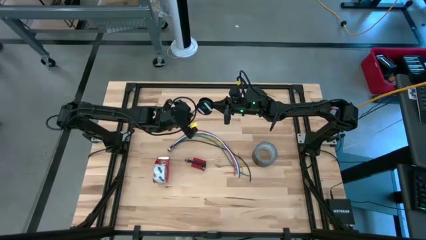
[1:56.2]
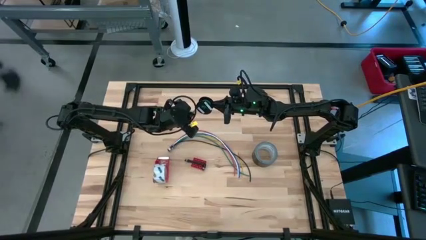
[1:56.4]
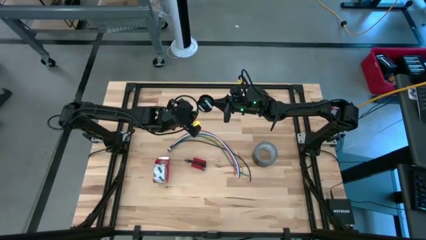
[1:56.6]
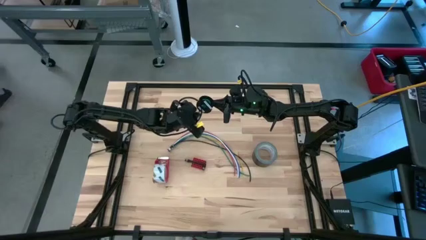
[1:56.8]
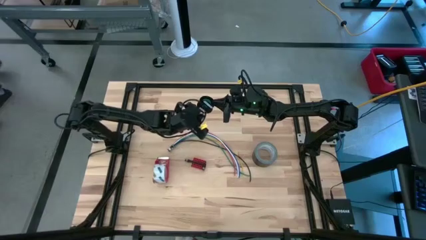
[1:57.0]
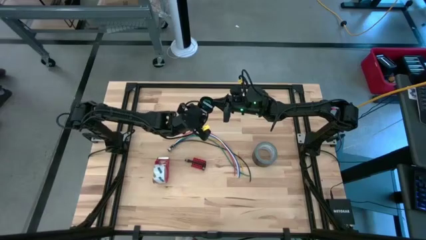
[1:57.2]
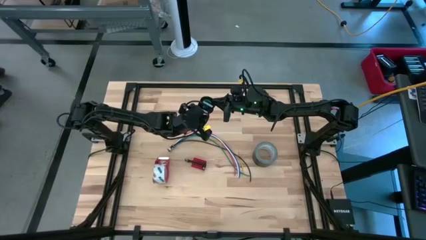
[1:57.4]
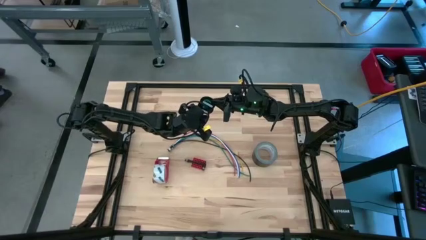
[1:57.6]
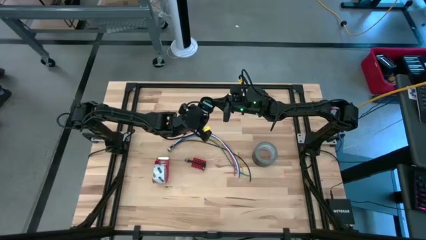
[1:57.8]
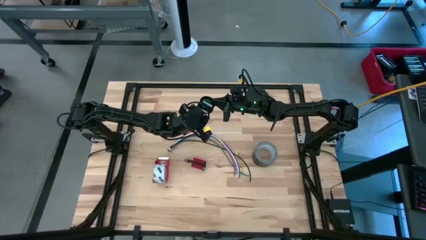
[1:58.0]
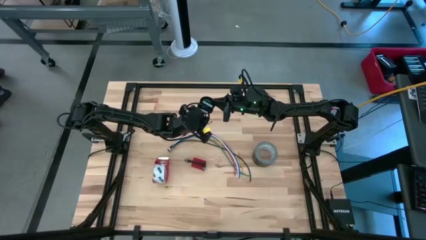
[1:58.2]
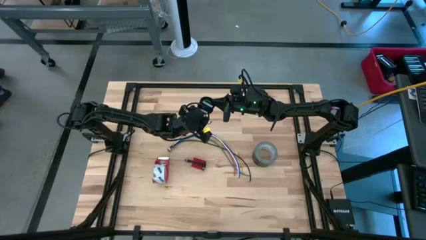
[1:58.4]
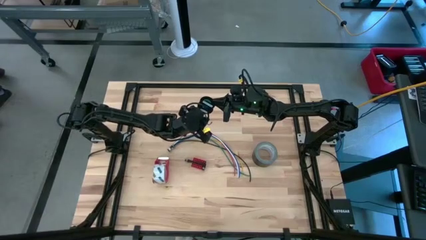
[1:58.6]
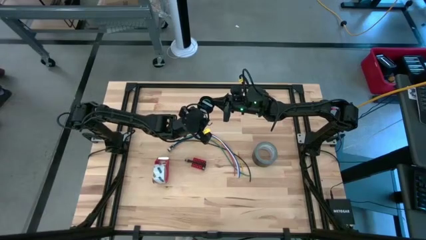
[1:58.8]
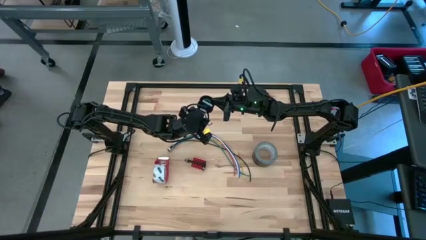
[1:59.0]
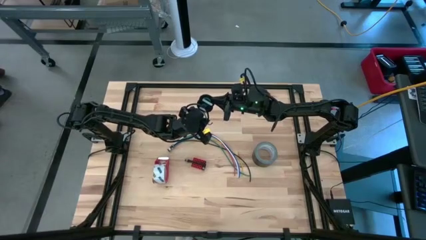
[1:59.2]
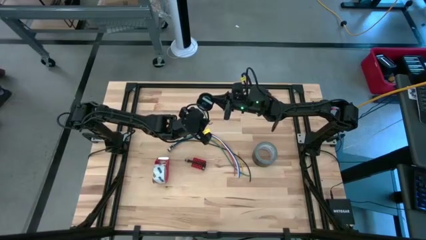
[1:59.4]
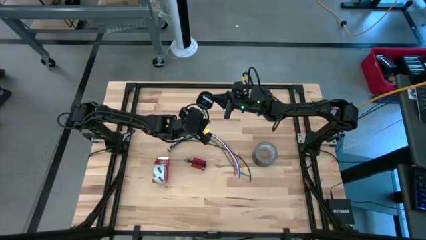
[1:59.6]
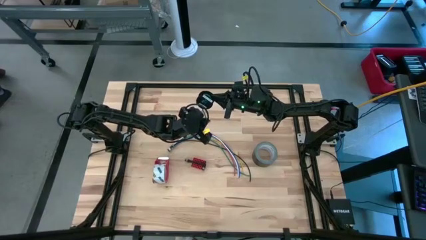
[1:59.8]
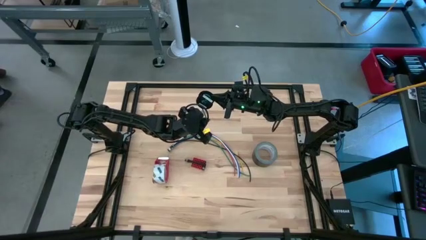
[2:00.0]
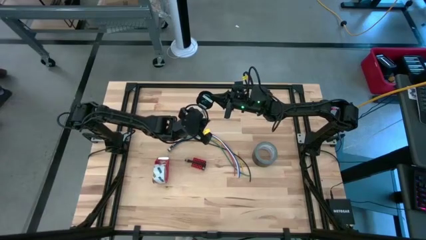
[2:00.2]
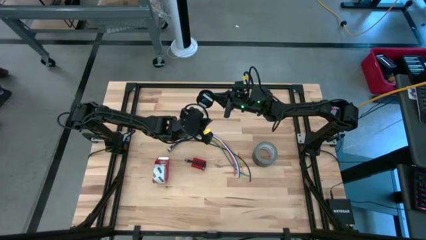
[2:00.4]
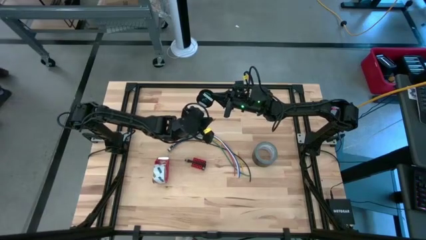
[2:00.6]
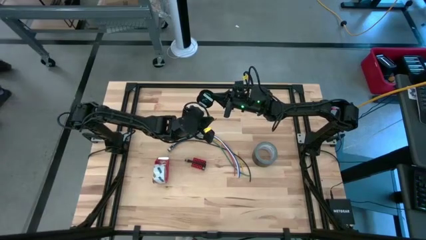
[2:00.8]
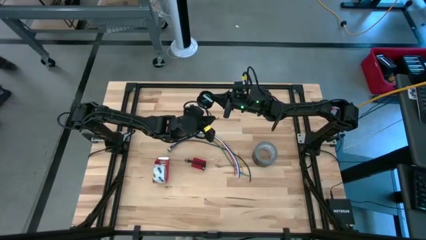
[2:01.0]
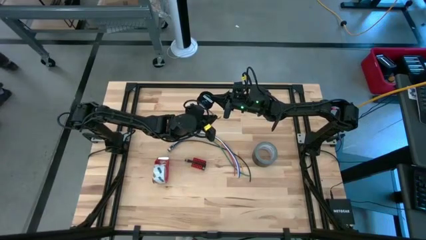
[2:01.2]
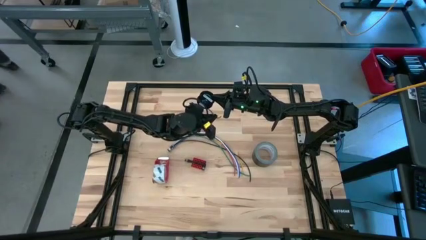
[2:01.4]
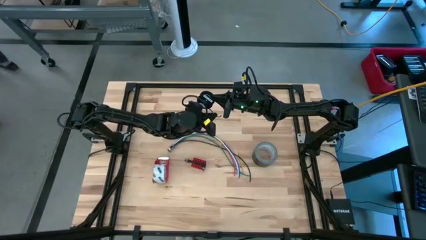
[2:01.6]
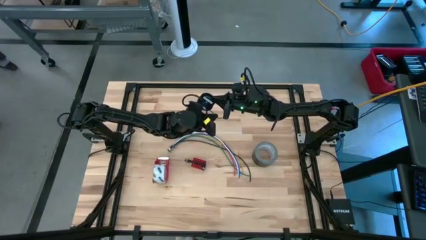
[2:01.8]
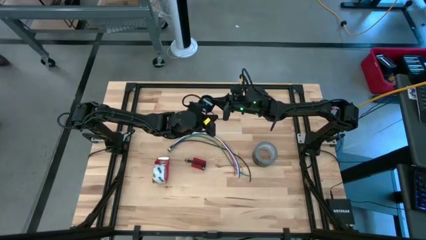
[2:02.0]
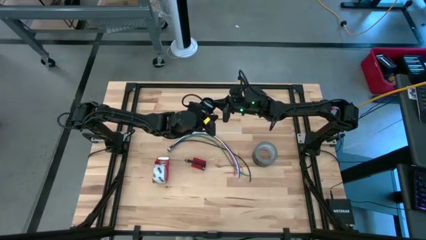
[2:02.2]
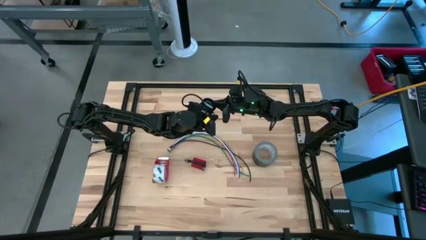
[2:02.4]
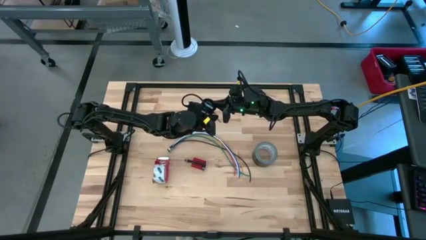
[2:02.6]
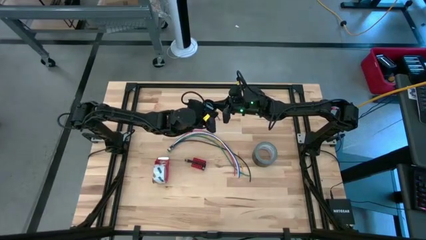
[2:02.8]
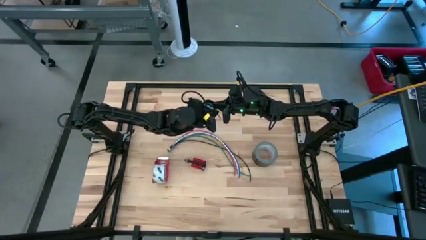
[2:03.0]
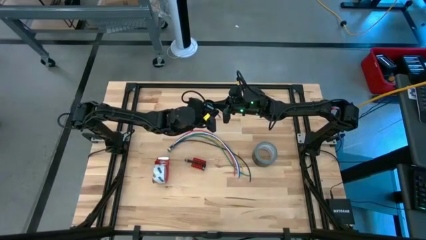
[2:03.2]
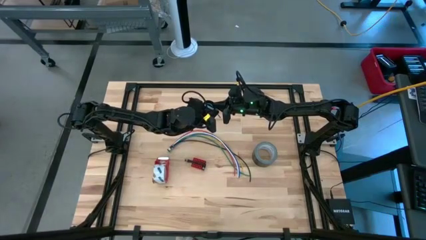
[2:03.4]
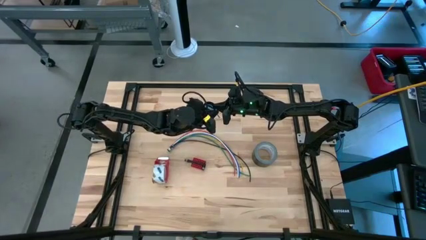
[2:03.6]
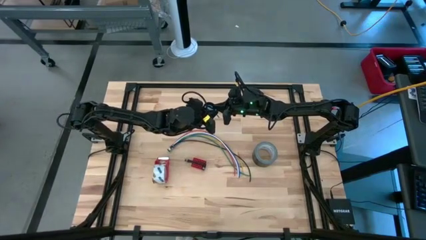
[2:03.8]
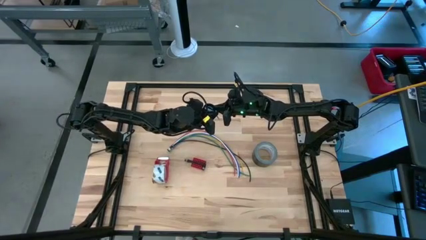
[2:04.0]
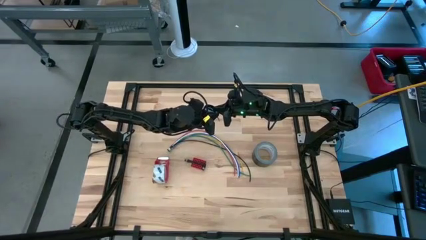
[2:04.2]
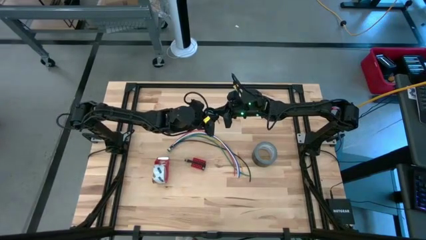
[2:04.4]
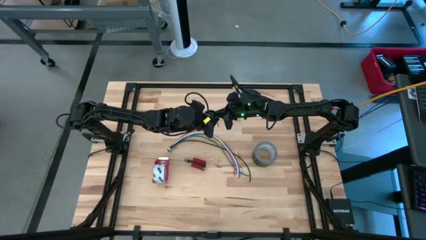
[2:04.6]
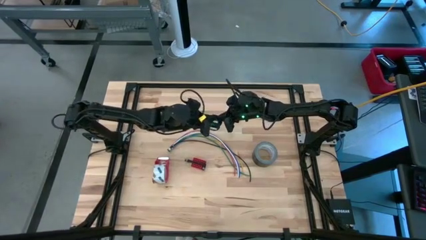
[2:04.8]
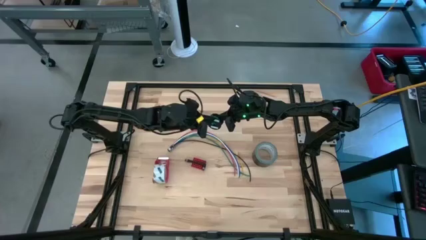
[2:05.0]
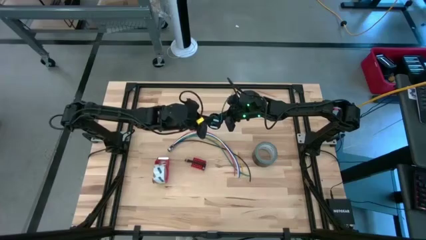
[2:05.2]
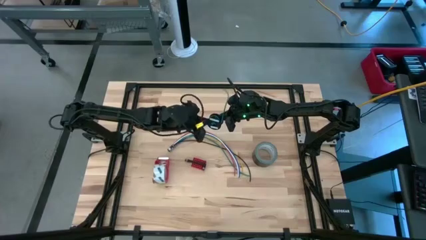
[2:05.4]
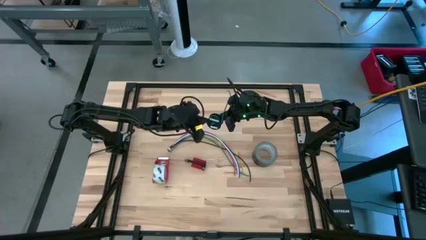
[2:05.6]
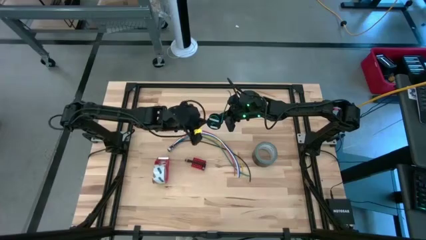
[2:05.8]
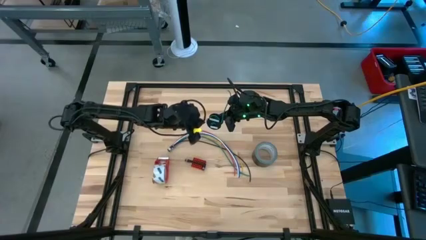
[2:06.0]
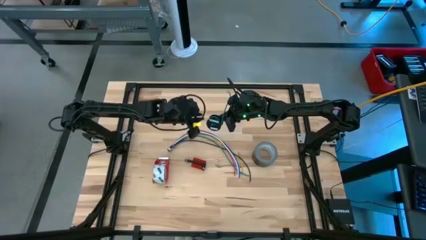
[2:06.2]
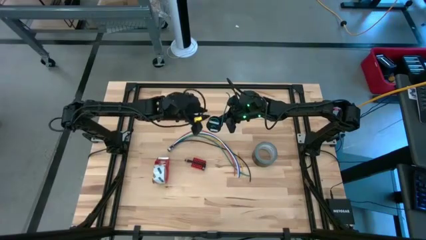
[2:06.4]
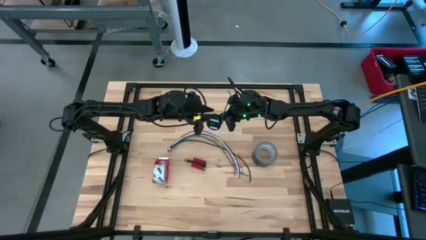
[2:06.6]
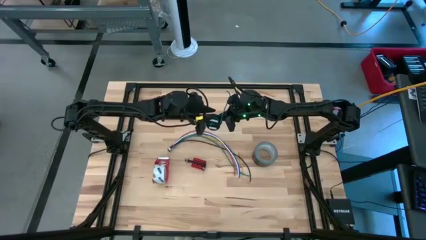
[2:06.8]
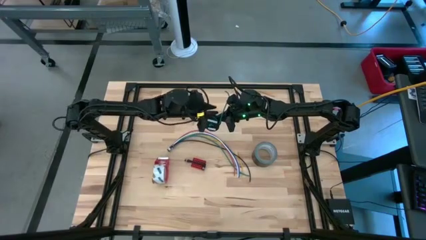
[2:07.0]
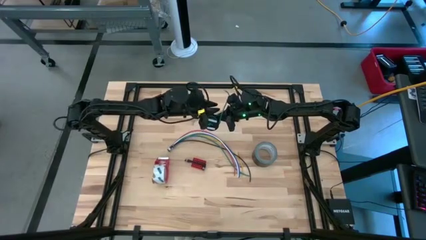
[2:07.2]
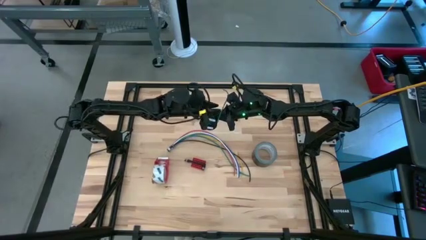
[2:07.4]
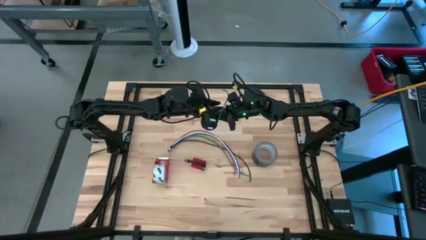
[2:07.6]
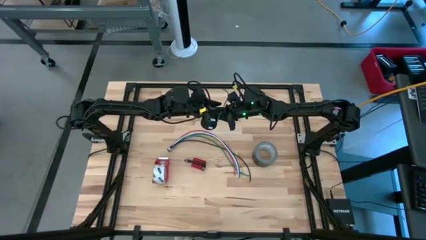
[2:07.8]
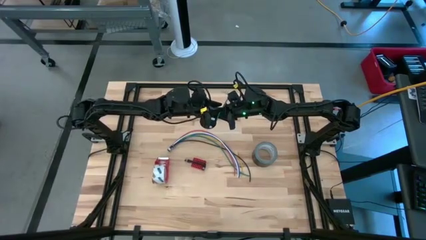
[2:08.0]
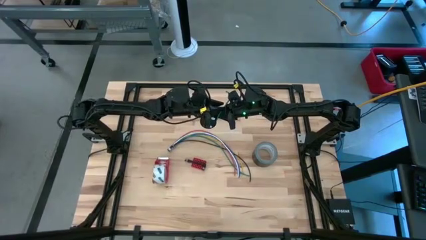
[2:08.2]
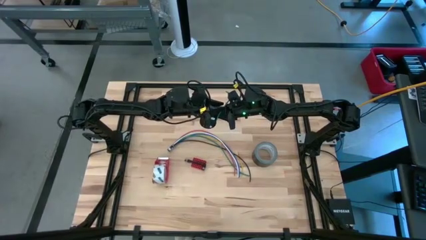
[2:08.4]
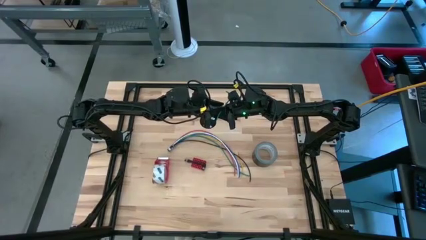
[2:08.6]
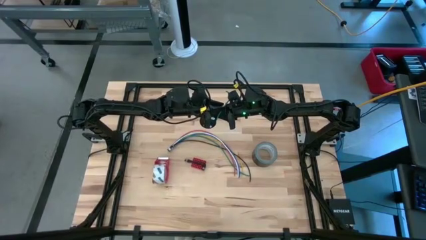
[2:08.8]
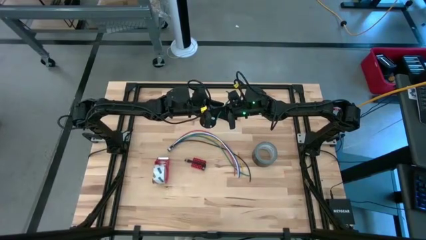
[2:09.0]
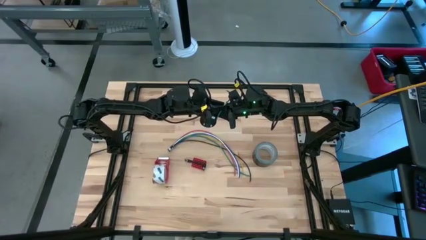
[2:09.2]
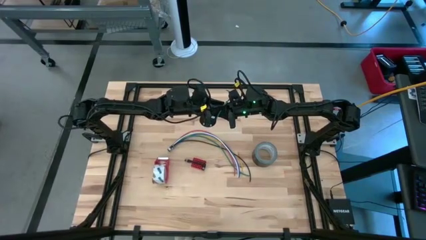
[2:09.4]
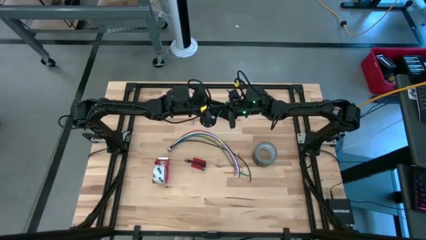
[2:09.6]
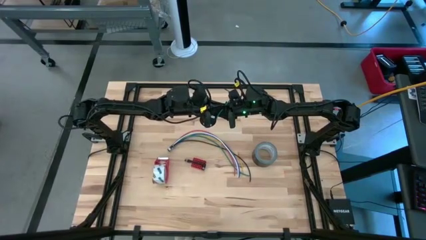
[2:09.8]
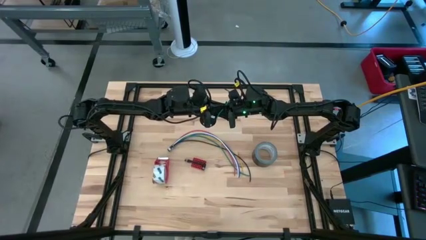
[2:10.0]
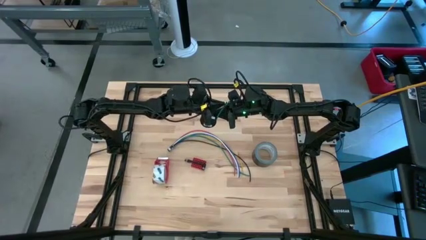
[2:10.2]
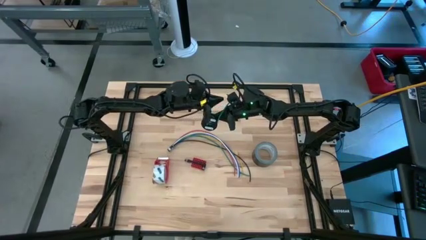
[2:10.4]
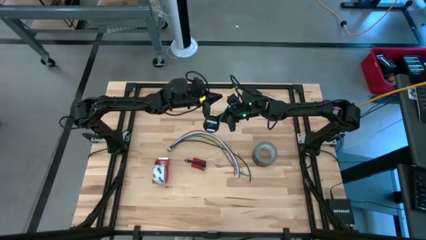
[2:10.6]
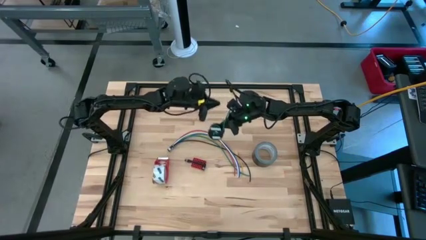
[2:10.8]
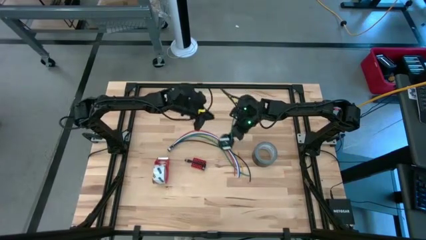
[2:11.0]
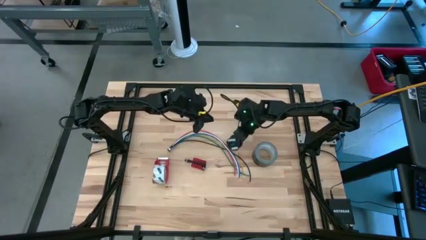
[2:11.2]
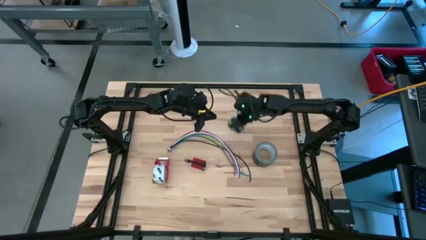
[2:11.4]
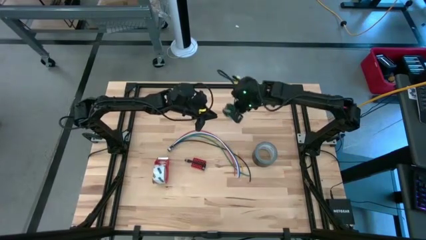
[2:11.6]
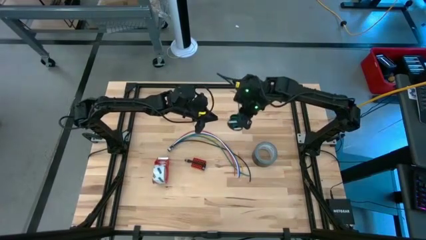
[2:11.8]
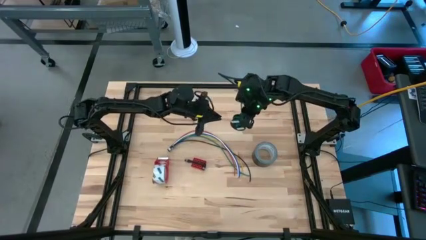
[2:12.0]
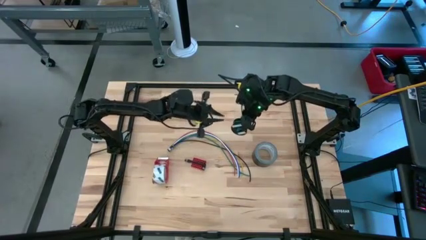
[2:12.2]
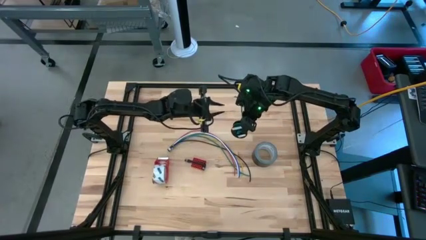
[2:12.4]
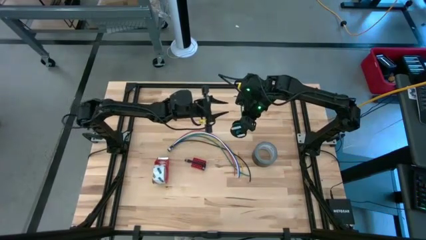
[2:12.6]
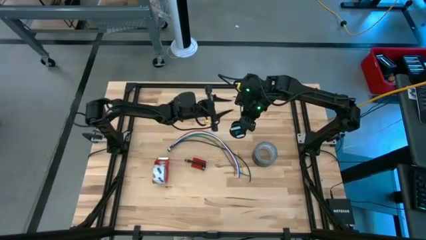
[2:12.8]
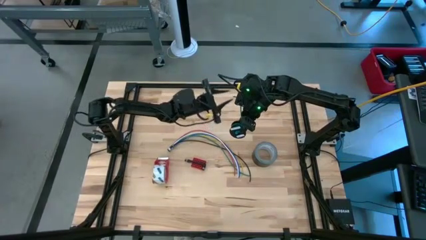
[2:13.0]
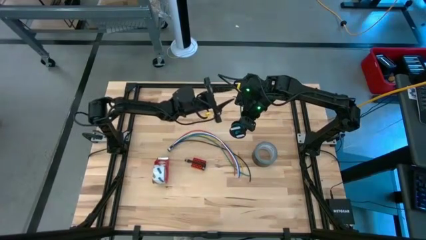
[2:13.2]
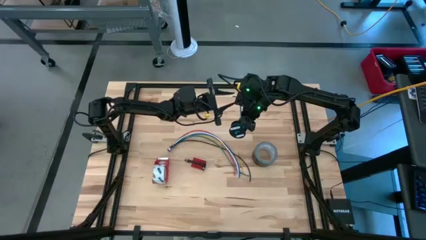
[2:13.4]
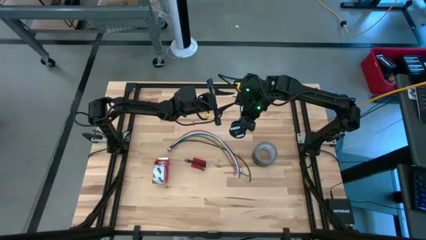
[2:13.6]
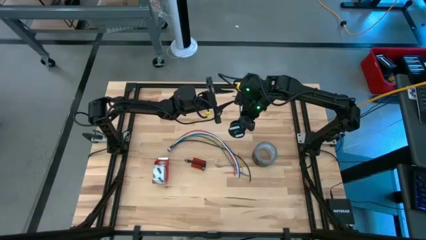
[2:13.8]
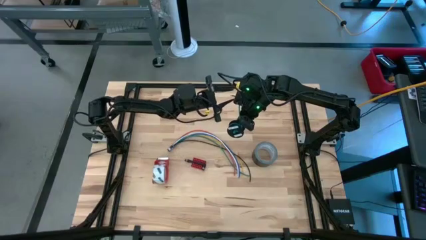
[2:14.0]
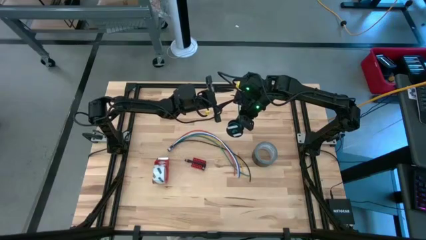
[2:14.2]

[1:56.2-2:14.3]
Task: Coil cords
Coil the green wire onto the black spool
